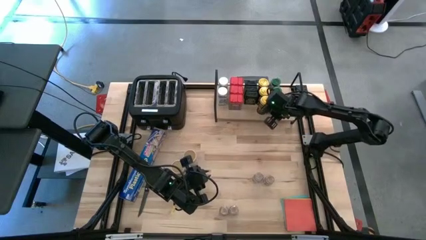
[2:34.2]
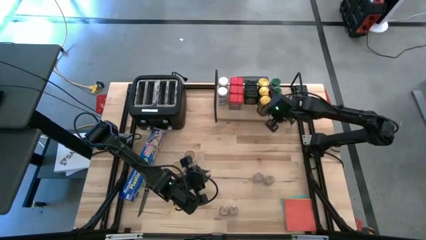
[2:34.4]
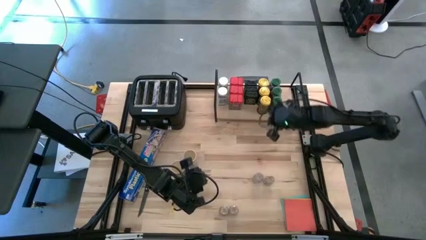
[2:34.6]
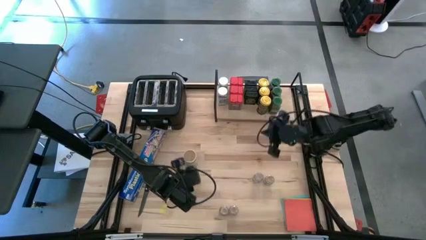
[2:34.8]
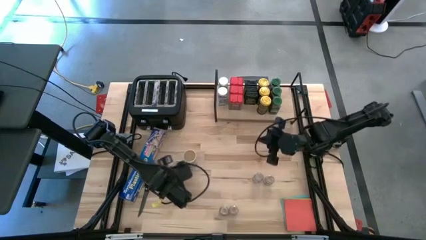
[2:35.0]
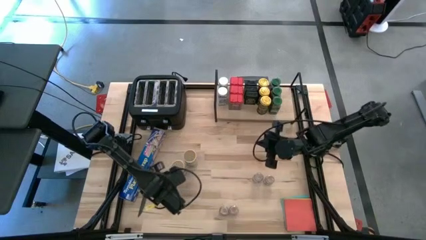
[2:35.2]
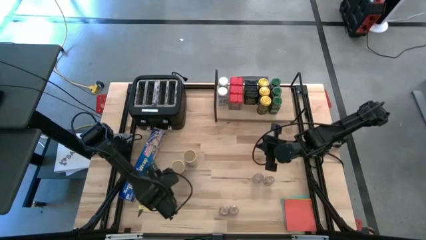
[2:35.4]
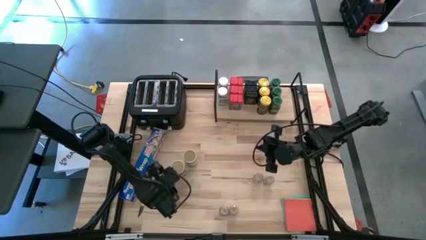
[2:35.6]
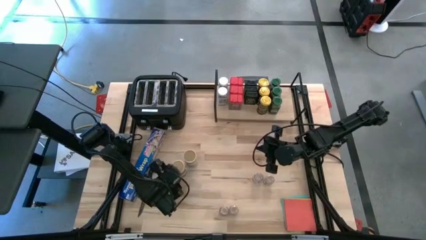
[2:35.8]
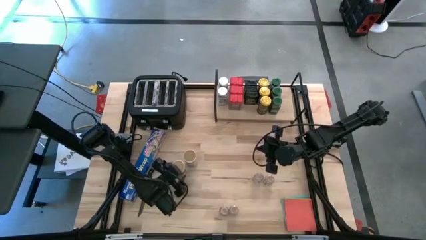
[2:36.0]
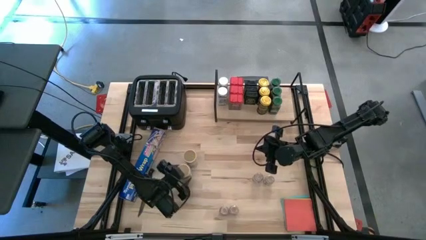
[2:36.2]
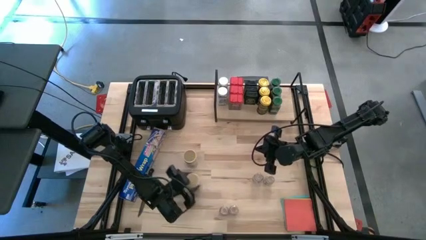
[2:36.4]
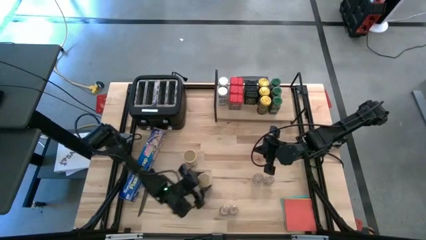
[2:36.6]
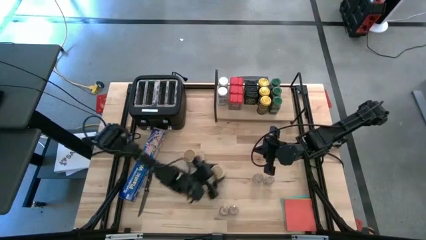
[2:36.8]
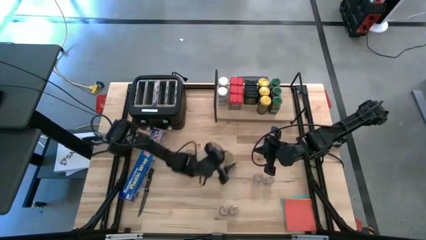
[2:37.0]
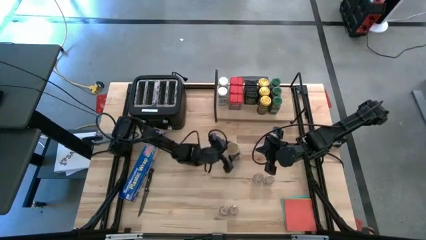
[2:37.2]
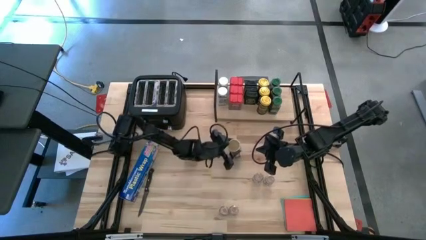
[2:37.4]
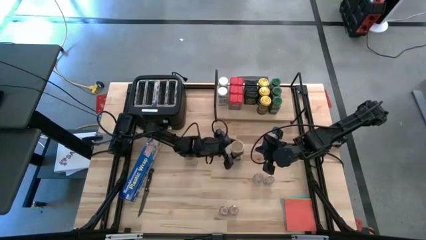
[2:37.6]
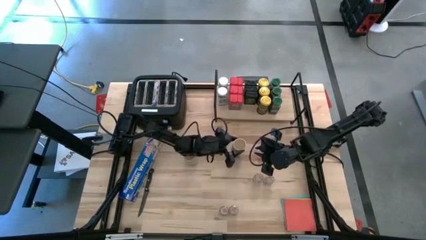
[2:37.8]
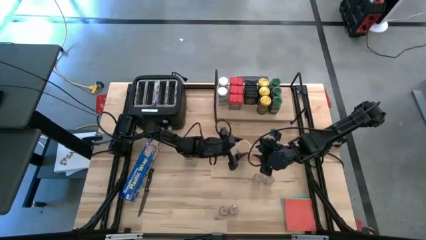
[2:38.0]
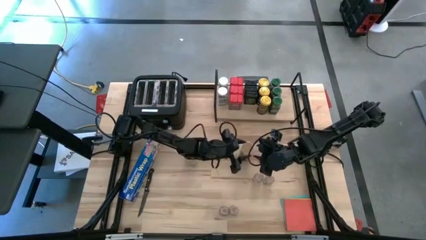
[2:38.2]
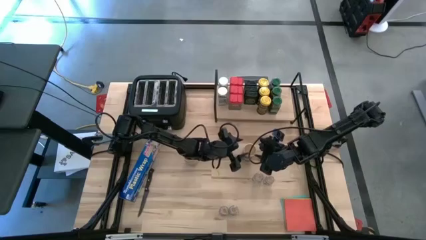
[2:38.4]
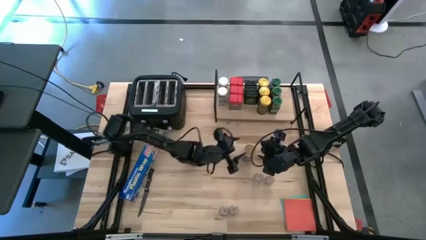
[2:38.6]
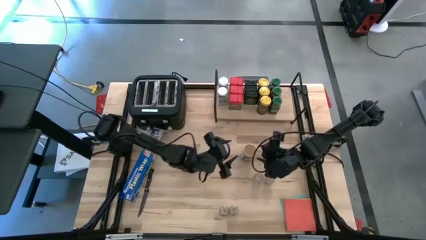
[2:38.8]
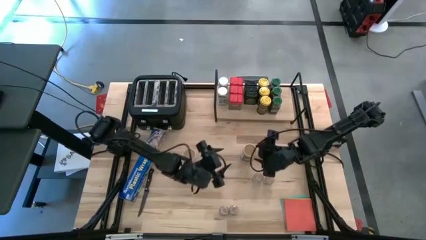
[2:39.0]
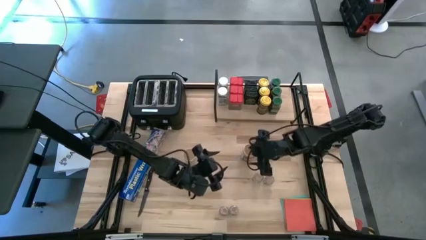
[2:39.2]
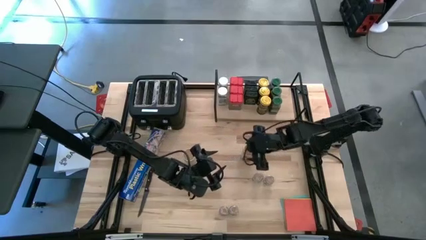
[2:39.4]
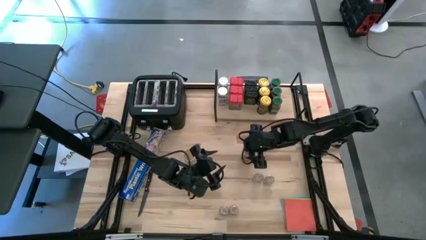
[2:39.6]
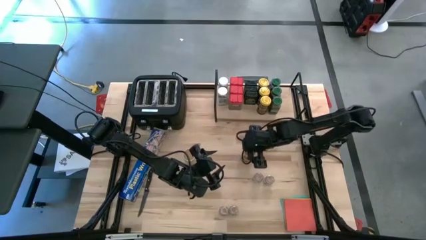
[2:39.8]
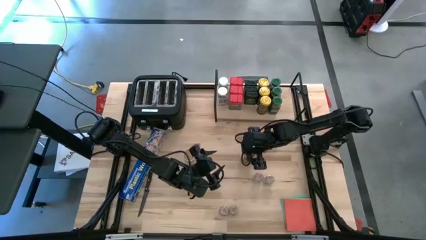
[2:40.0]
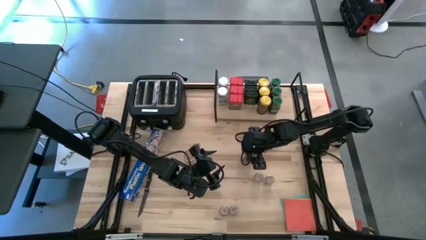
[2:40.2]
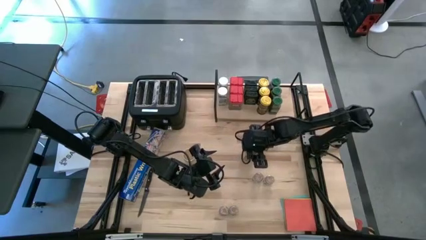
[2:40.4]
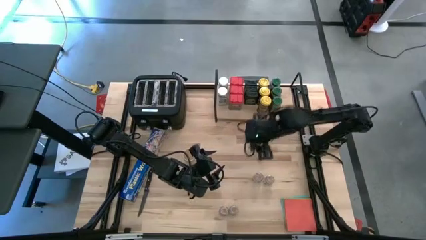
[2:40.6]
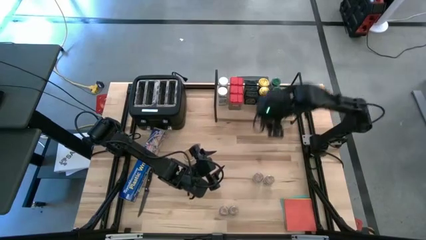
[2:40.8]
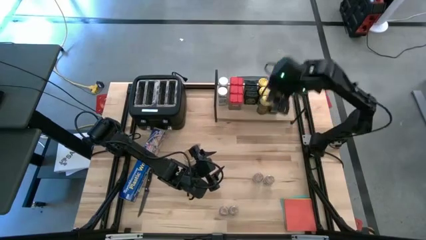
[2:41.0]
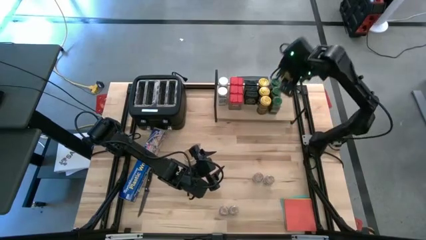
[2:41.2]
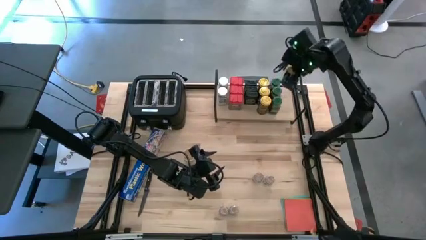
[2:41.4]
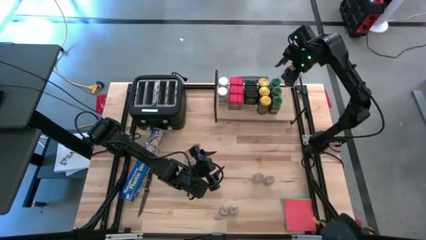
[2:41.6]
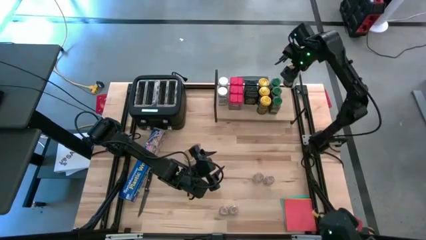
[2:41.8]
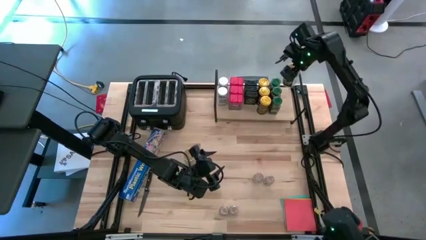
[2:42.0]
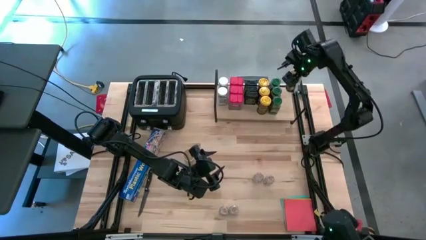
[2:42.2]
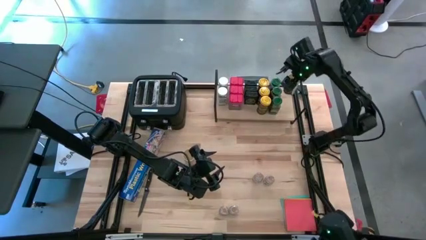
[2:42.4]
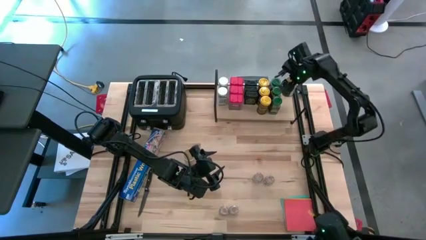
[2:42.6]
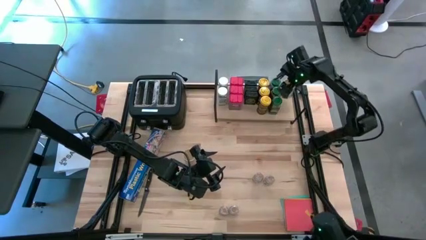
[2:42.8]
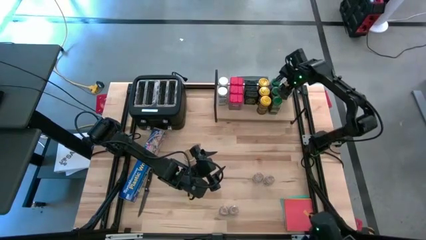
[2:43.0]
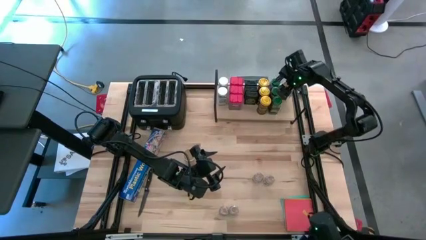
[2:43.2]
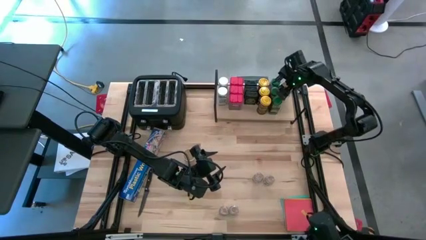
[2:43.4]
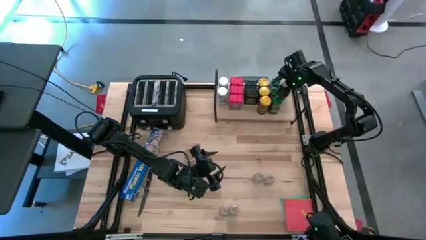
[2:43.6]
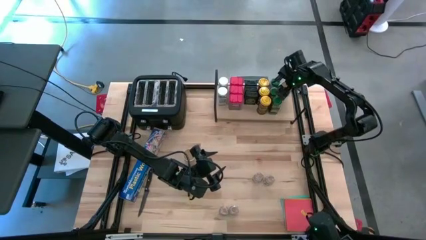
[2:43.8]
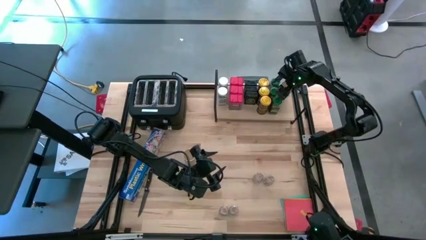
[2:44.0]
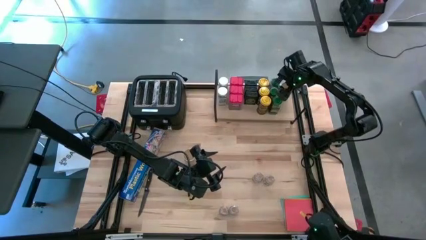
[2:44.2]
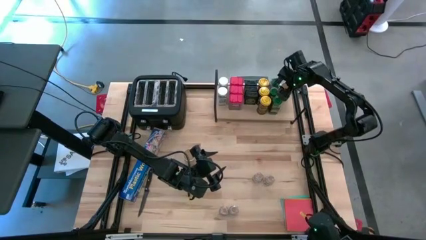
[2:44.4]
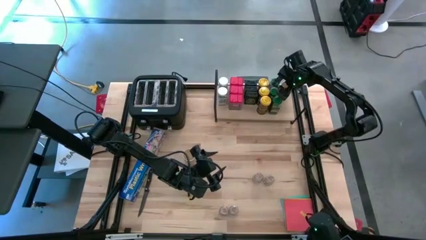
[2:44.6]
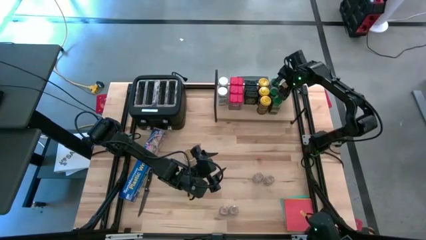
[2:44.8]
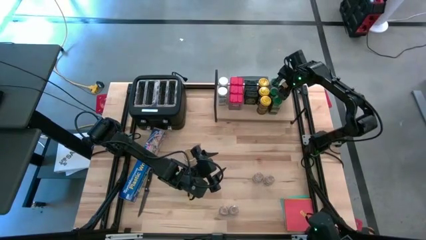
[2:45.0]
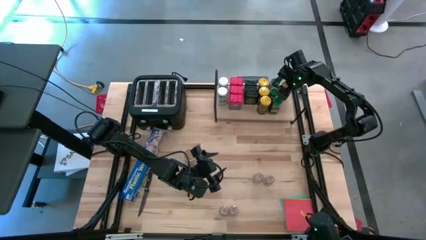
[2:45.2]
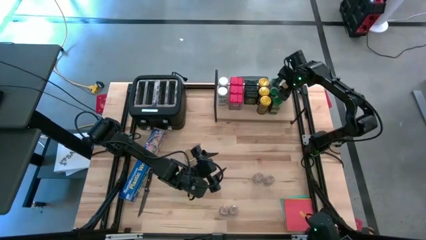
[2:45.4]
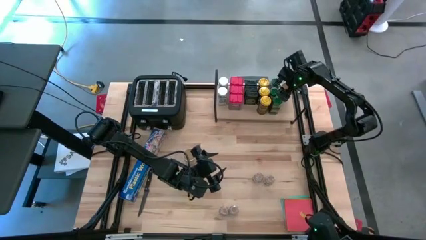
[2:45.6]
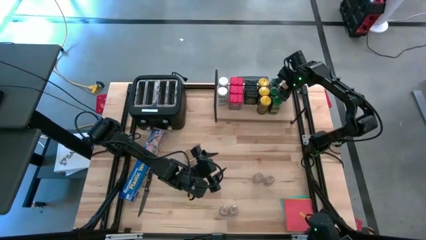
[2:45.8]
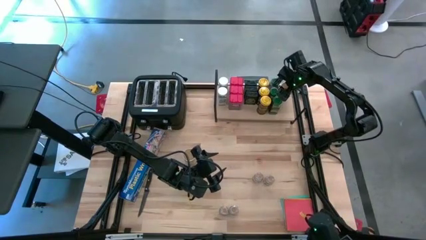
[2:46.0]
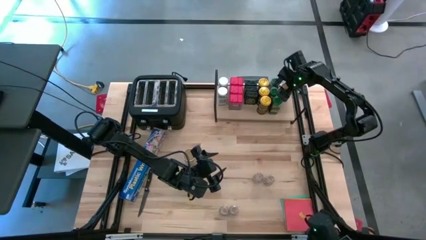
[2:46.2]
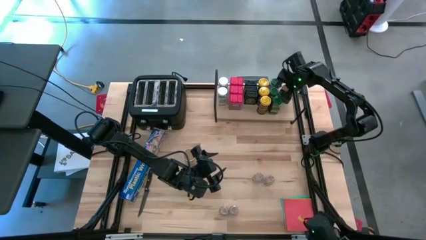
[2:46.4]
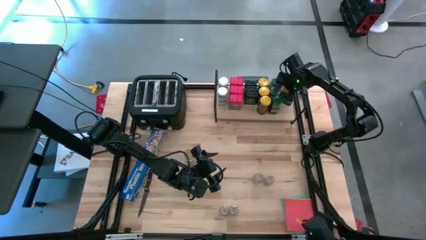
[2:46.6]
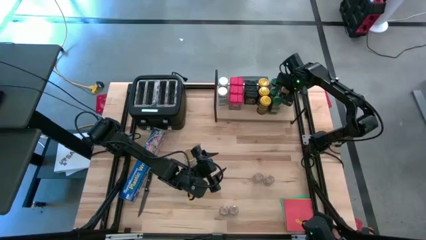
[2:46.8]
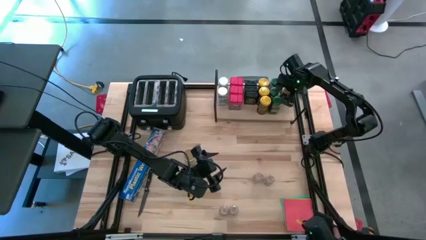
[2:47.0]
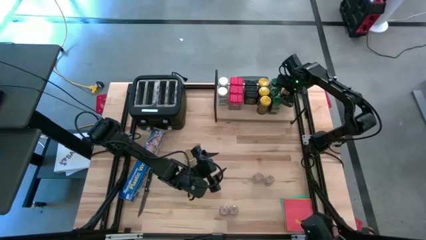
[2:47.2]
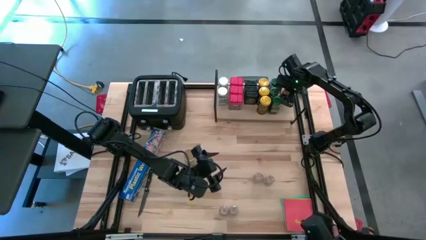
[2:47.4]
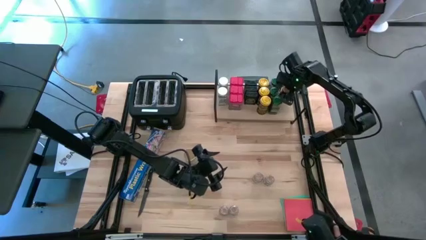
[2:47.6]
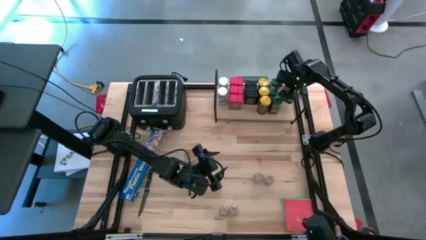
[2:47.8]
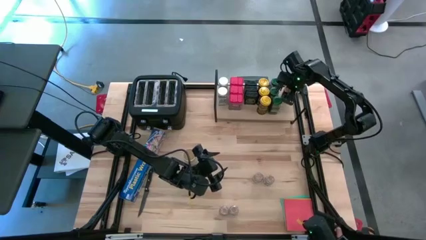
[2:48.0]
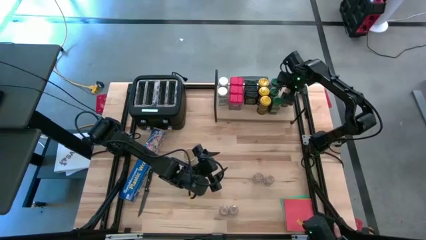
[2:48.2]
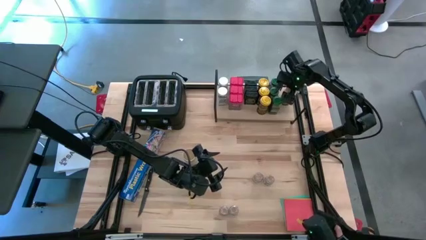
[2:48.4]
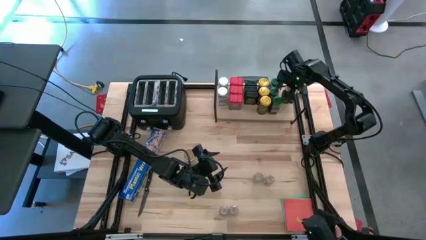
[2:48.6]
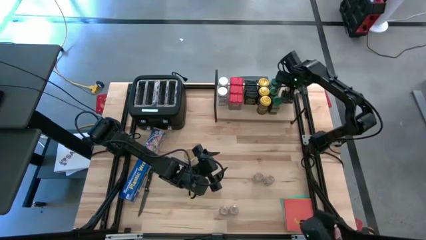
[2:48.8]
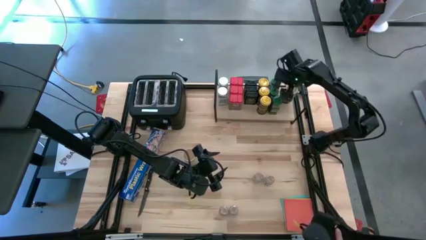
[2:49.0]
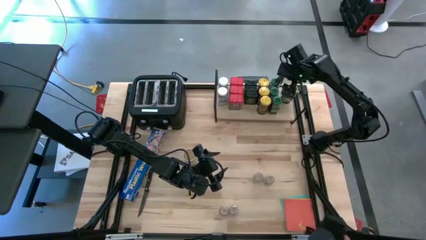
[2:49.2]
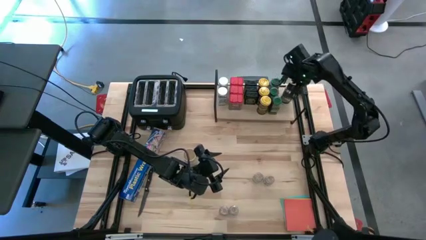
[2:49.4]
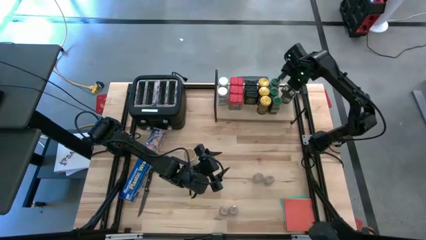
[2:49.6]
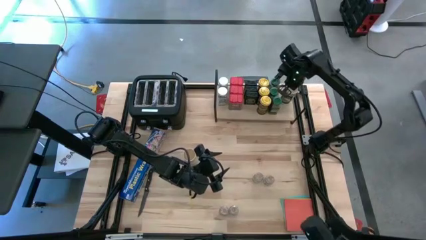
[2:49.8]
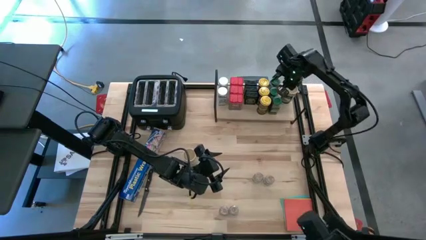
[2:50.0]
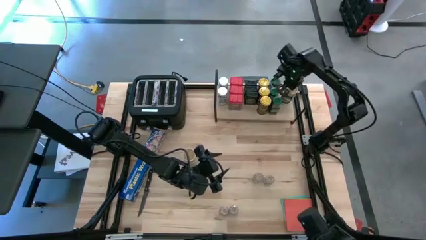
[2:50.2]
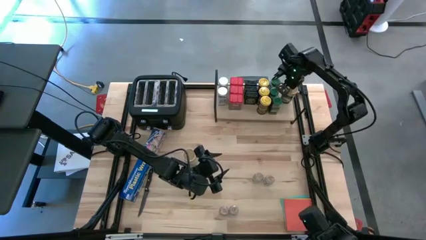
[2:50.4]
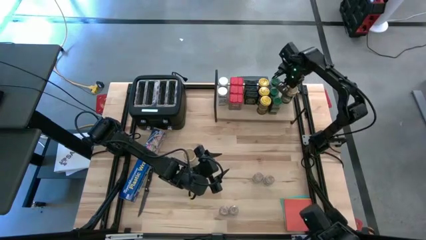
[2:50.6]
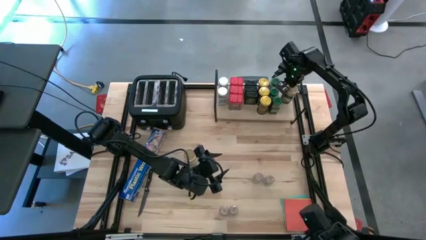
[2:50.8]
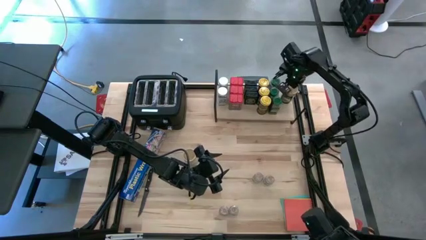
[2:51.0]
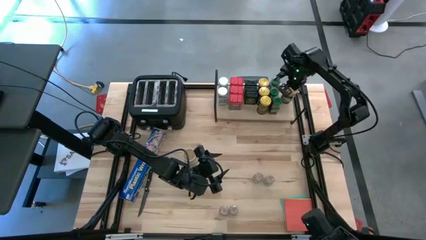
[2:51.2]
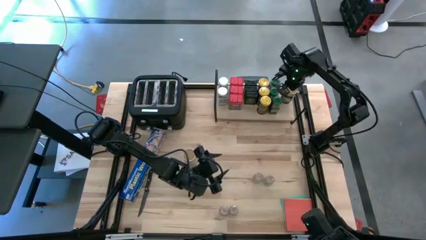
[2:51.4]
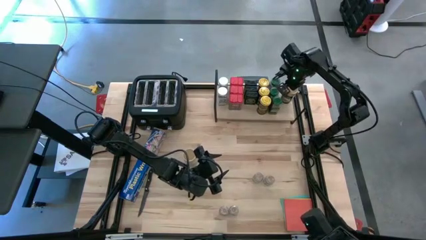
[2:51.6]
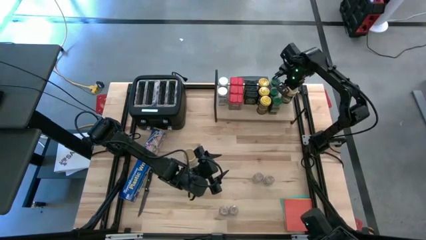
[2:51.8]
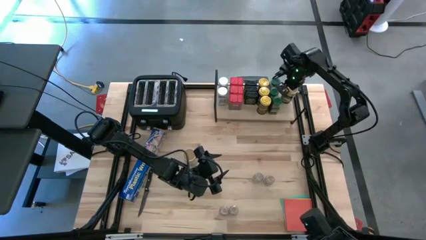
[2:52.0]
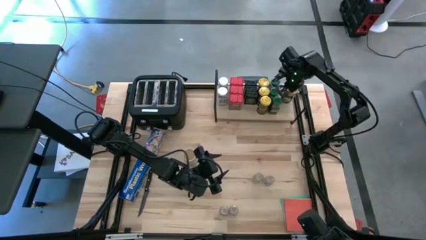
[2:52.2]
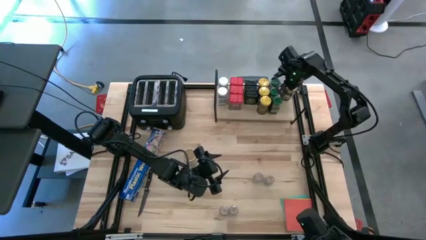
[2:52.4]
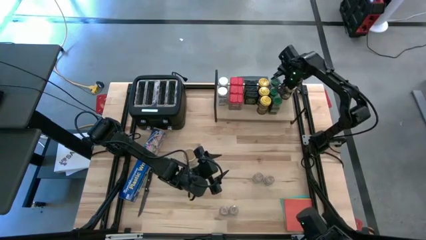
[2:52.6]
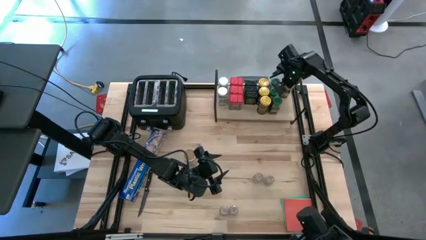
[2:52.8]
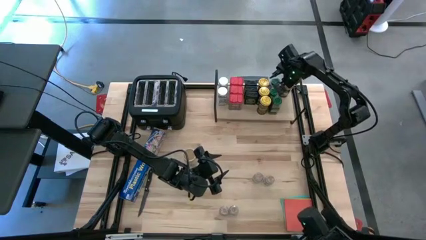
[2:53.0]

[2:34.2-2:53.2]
Task: Shelf spices
Put the top right brown seasoning bottle on the shelf
